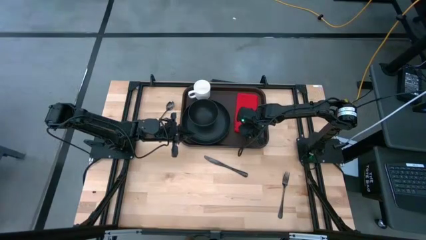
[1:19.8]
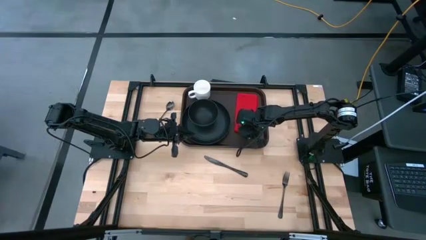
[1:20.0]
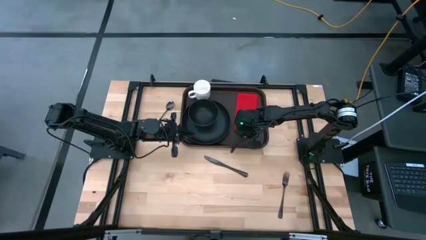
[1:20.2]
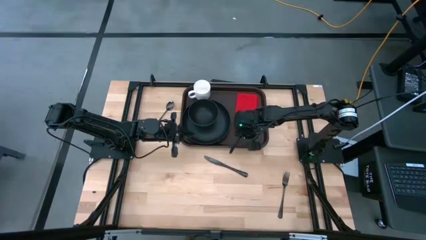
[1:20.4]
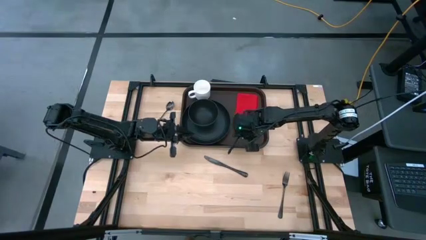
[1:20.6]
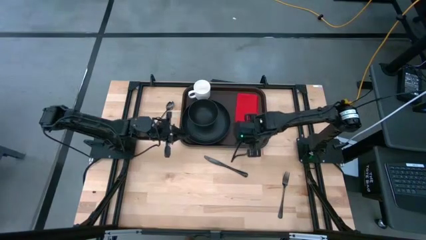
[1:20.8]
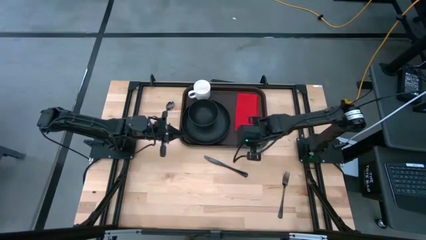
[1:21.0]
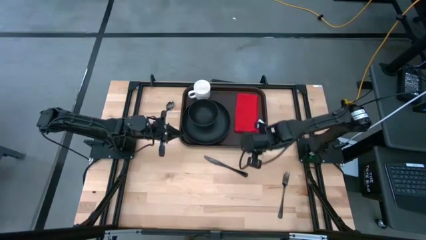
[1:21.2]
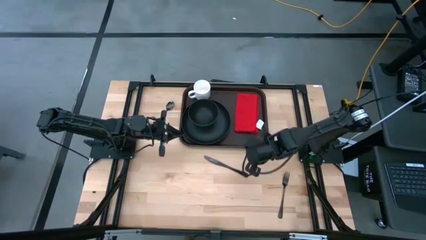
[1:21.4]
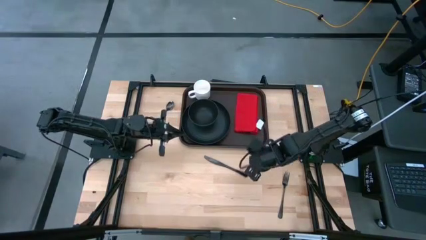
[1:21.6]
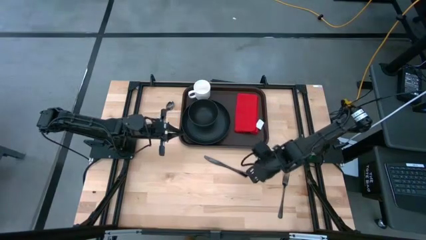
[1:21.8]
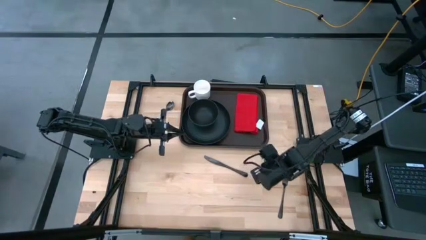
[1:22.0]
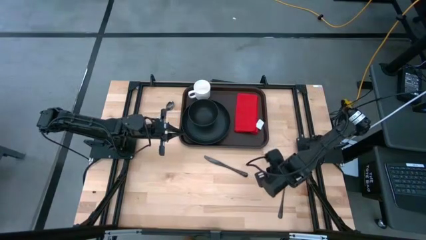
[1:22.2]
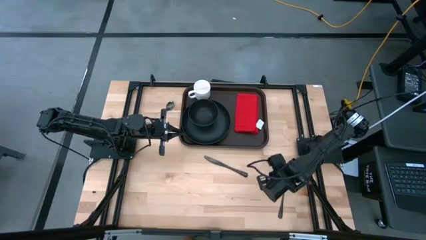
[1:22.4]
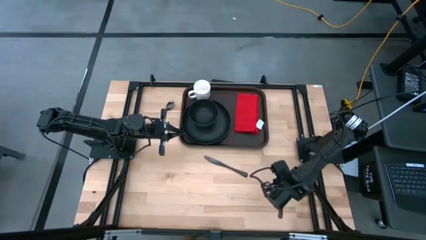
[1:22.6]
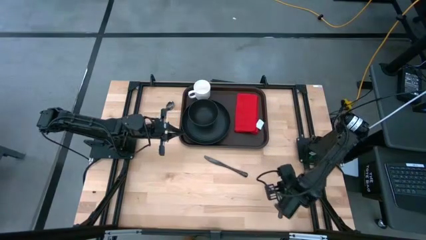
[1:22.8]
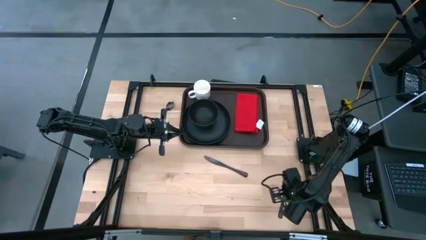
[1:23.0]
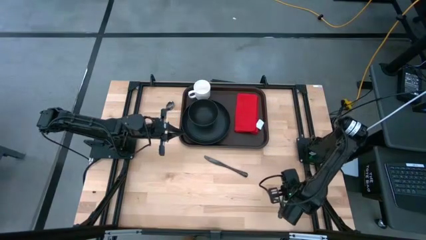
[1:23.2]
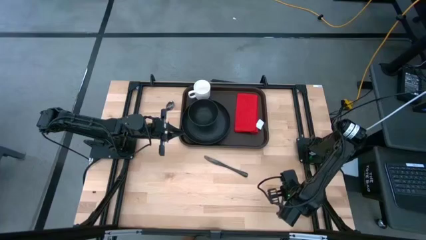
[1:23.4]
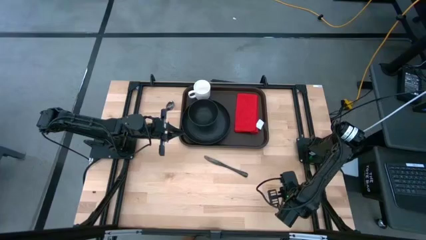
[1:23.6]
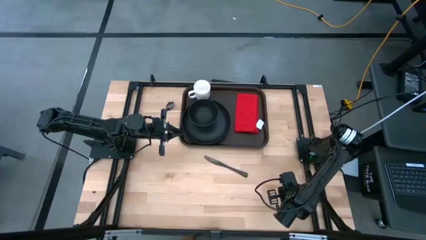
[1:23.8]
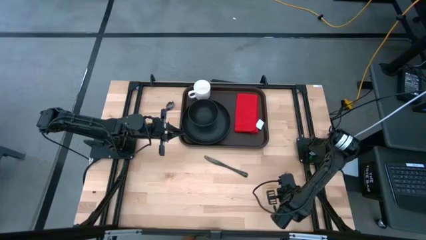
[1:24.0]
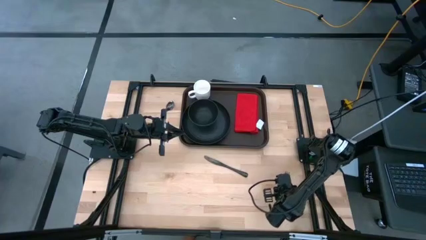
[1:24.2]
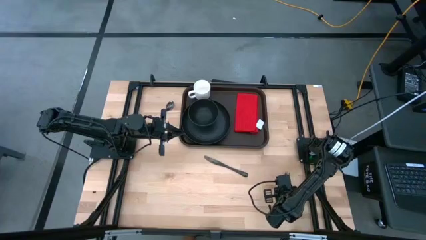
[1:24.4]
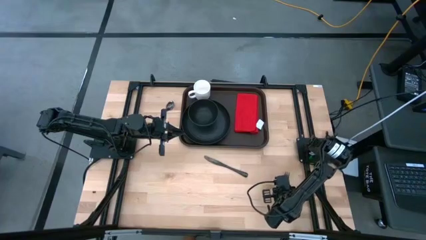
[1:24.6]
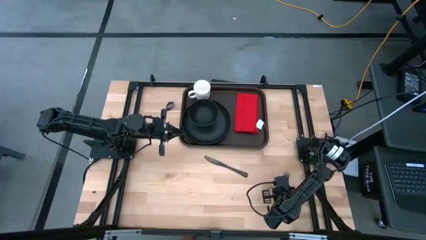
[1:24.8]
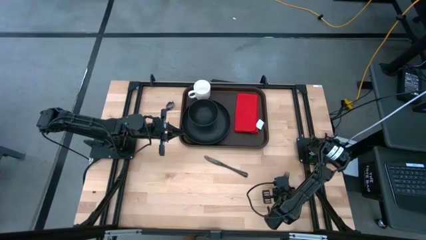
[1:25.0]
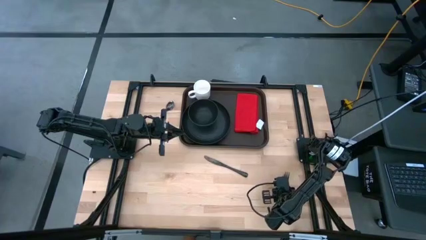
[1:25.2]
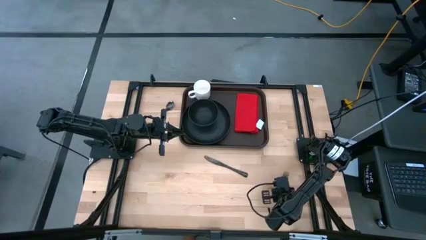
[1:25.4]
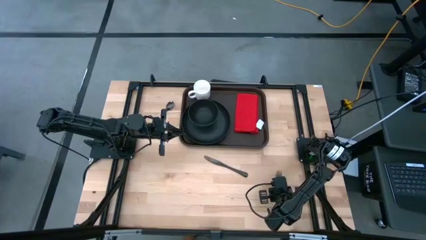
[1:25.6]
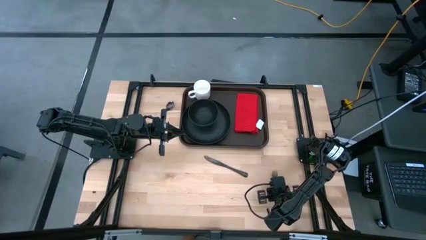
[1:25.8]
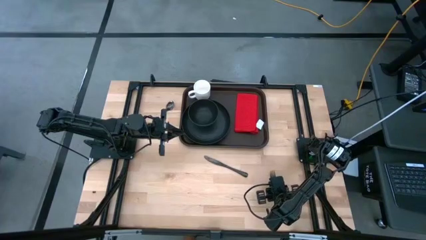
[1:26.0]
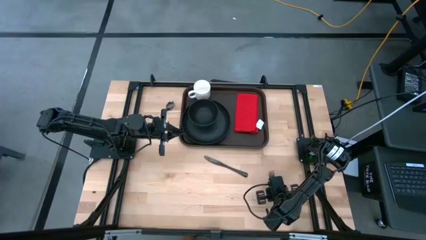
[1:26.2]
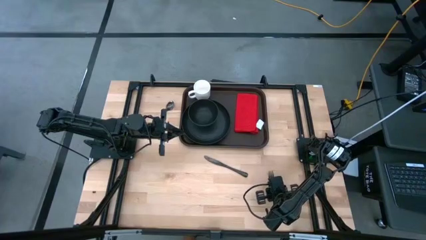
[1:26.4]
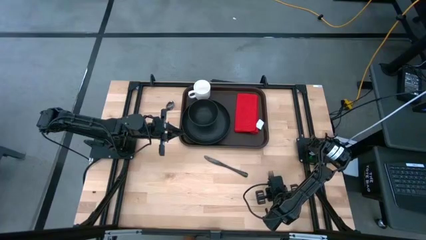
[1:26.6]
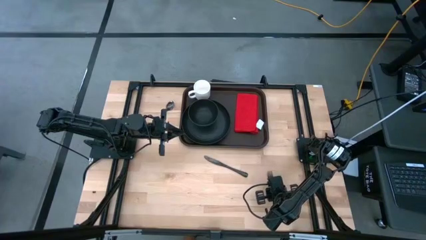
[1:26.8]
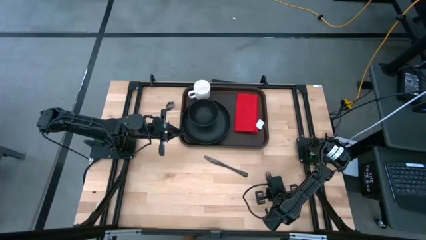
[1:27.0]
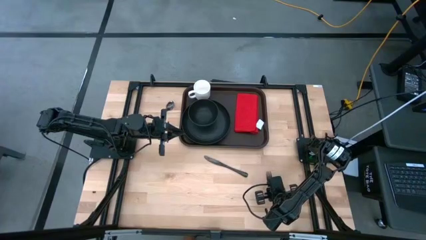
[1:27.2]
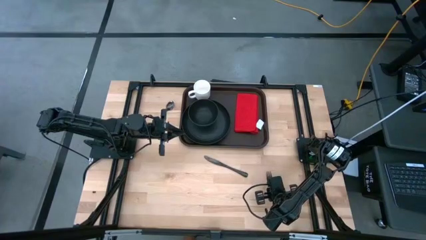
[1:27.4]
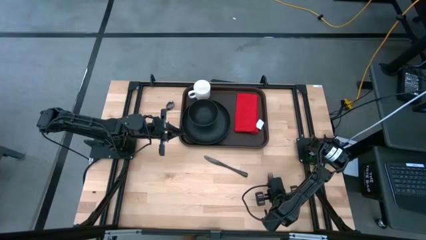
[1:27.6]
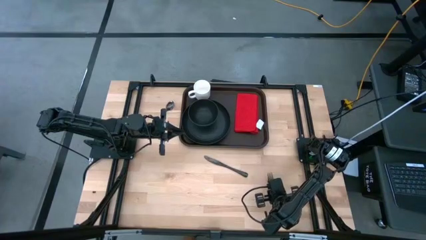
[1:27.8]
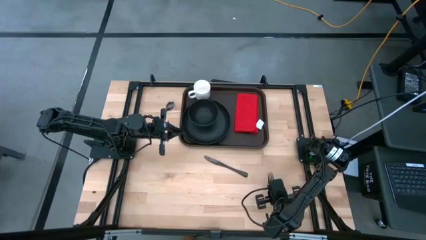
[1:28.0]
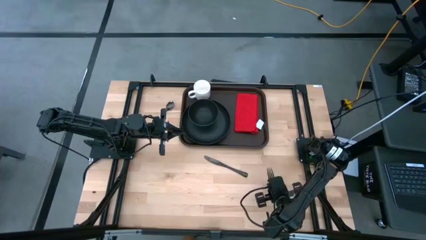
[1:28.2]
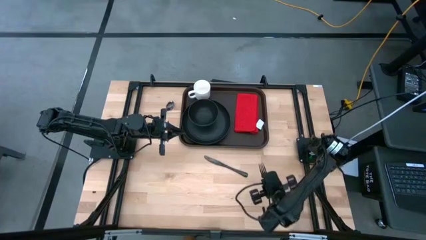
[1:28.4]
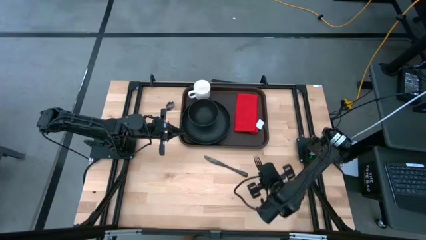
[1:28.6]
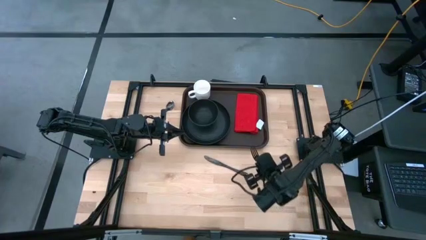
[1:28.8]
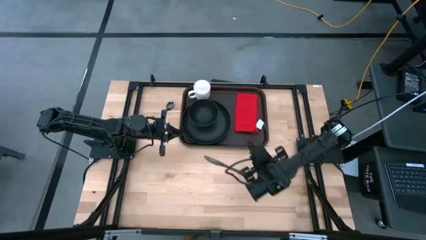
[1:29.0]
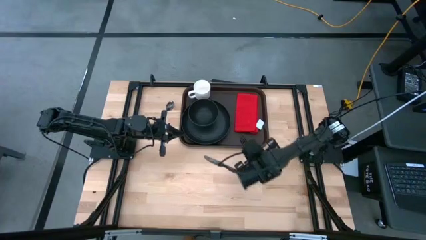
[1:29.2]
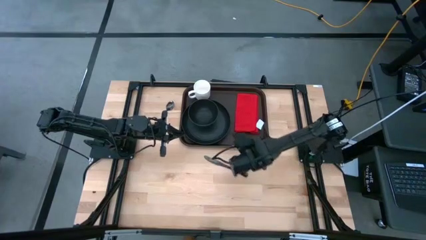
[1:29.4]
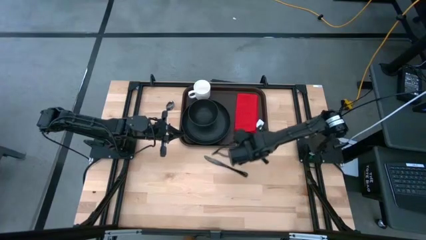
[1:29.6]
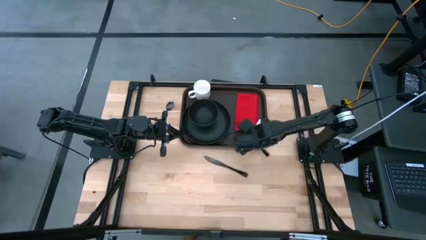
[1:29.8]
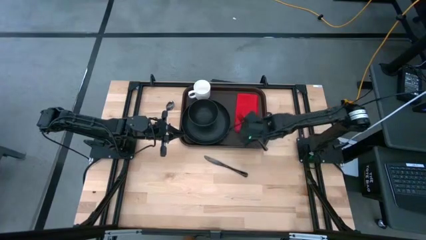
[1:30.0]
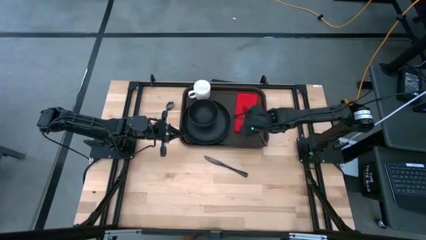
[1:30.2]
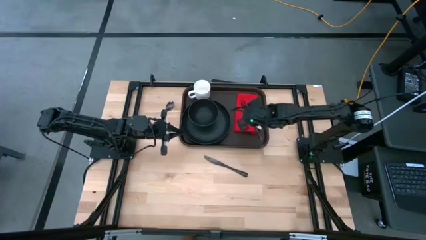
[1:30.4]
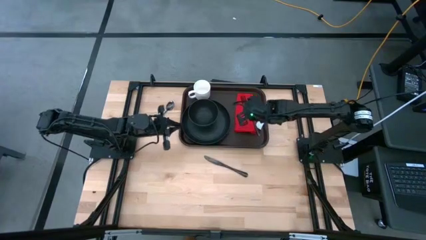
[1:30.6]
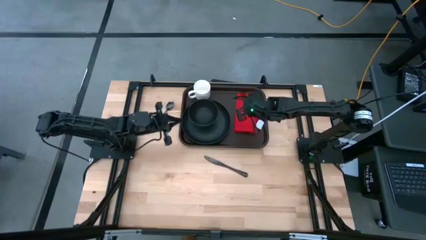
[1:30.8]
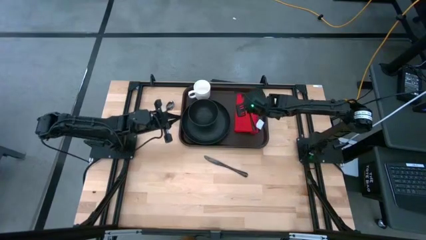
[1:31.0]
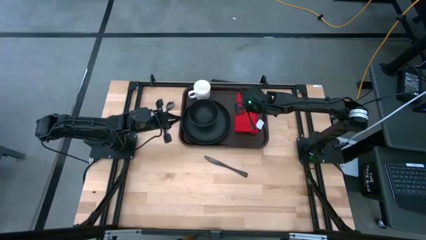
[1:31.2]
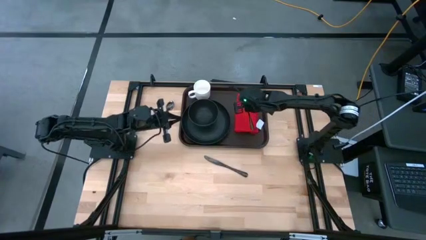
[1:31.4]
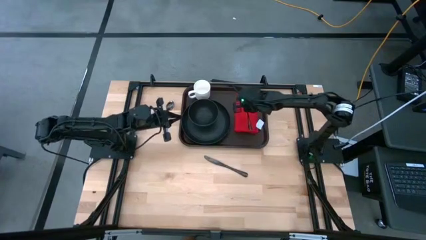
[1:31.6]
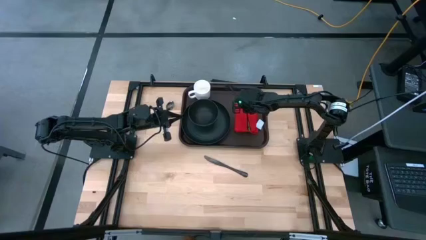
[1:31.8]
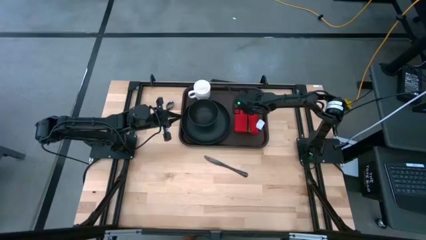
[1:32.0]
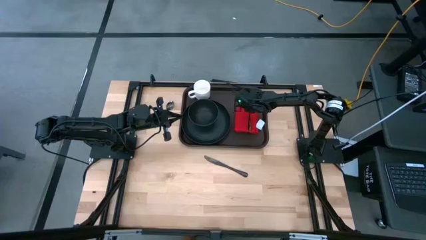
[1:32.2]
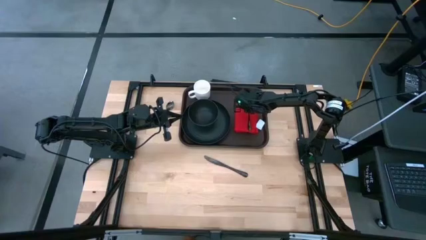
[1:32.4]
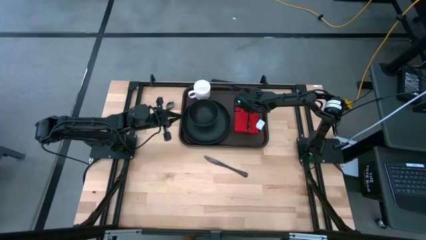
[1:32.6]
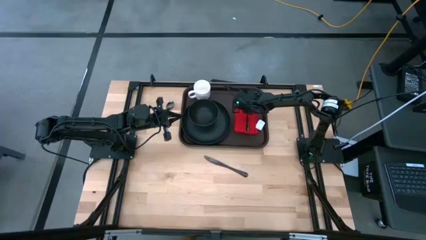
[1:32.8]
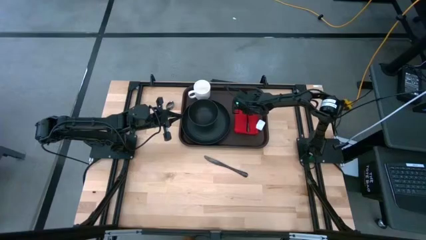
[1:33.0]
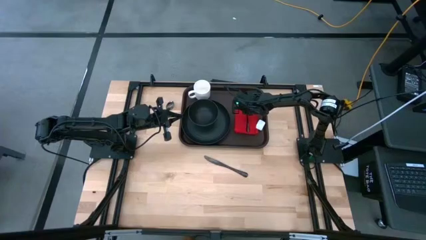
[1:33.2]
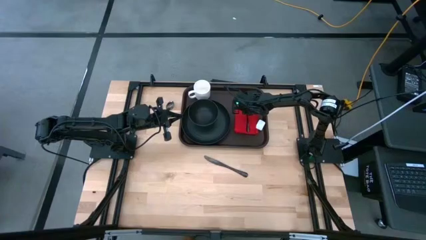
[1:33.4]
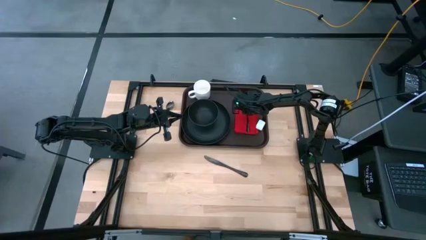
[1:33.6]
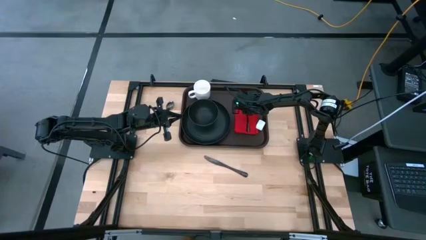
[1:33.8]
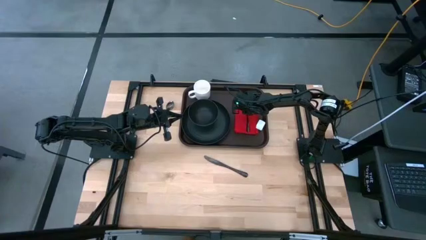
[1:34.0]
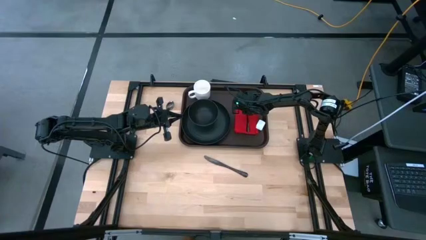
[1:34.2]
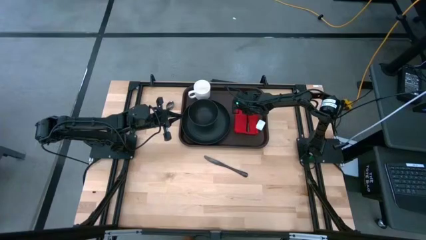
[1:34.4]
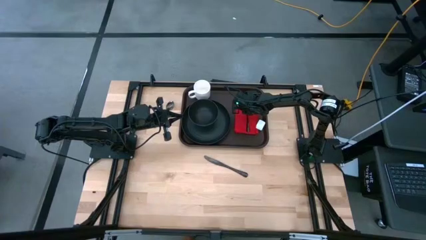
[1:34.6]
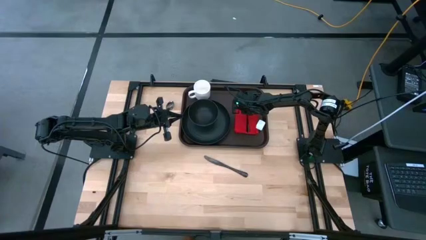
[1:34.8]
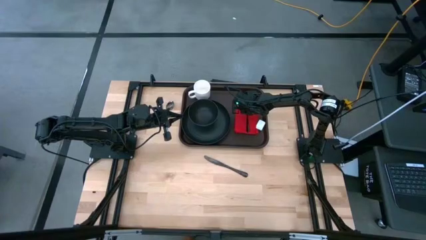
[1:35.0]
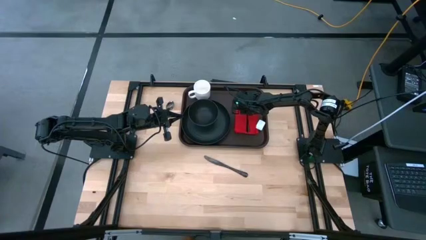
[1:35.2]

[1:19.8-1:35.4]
Task: Set up tray
Put the black fork on top of the red napkin
